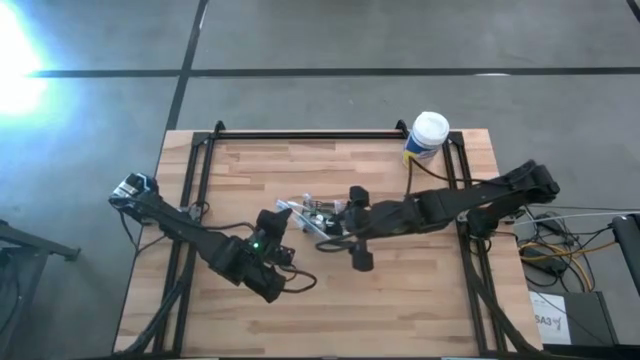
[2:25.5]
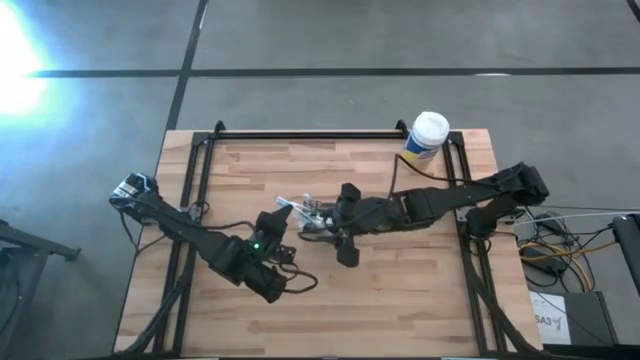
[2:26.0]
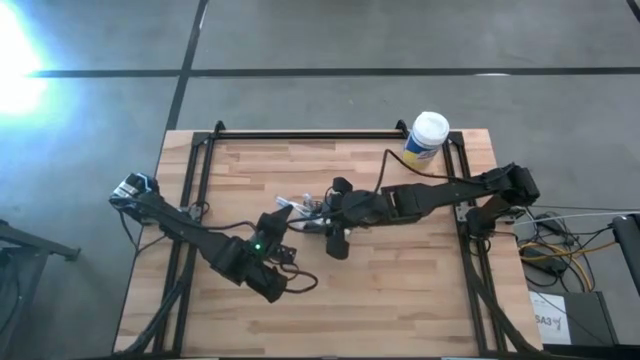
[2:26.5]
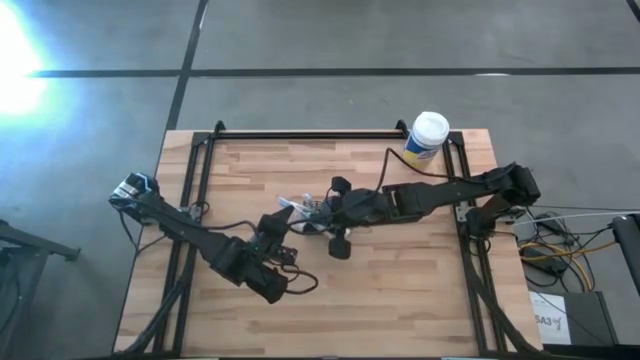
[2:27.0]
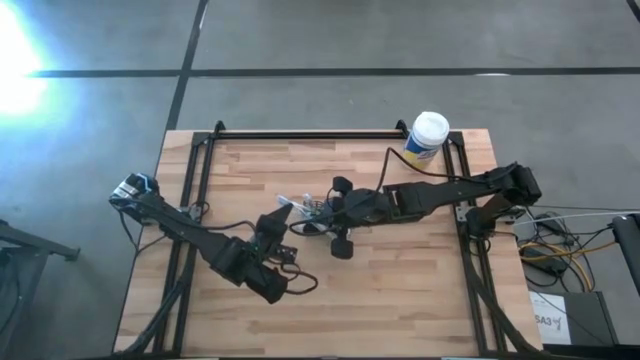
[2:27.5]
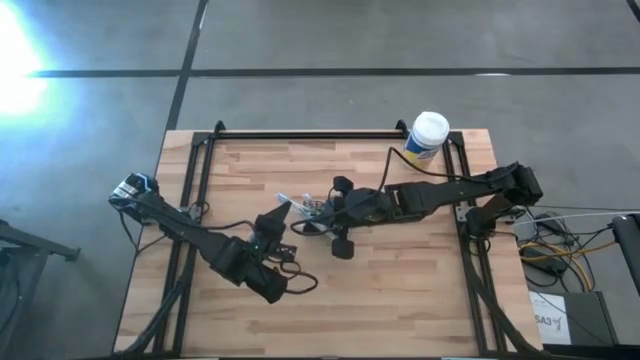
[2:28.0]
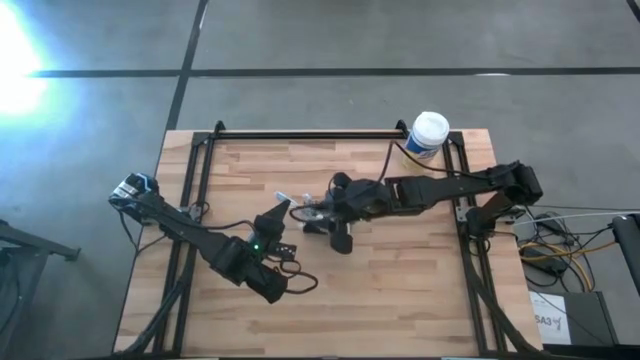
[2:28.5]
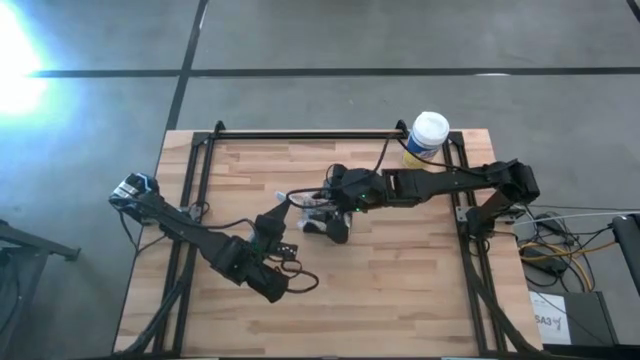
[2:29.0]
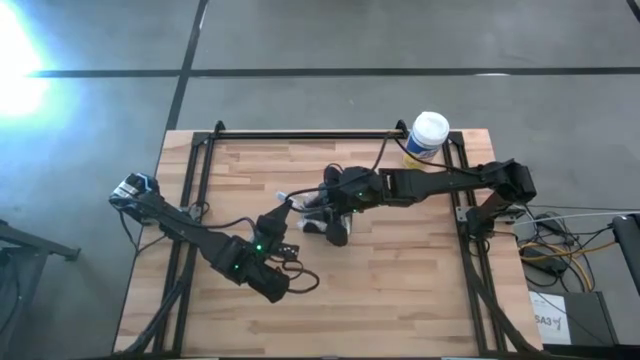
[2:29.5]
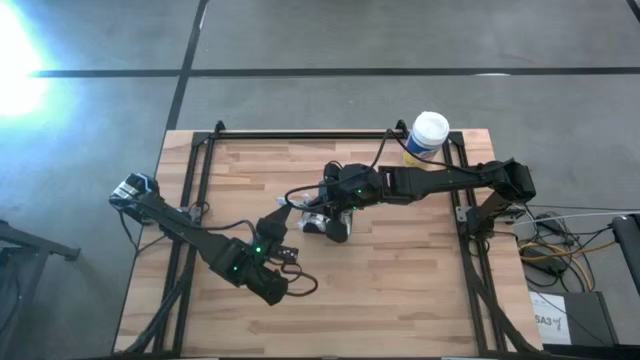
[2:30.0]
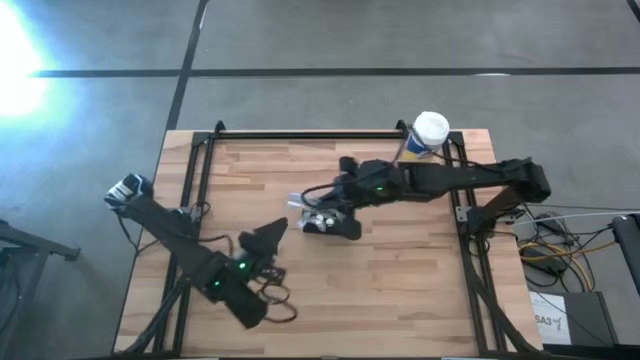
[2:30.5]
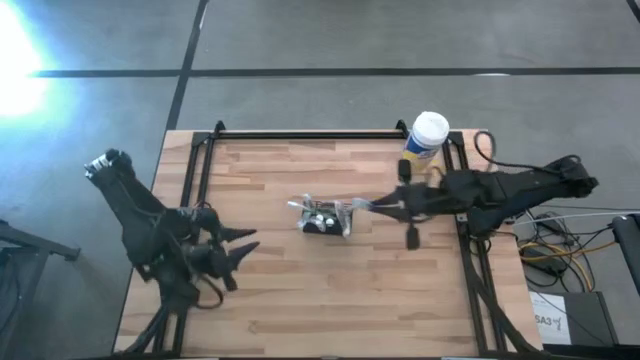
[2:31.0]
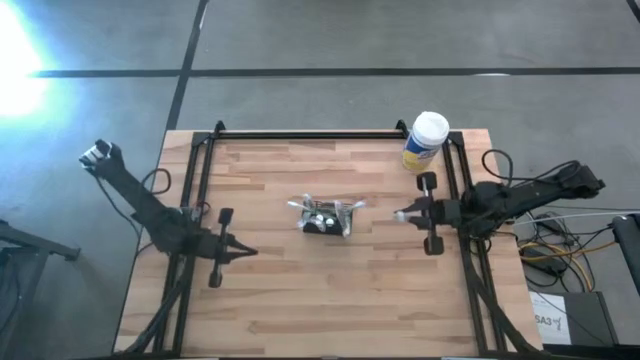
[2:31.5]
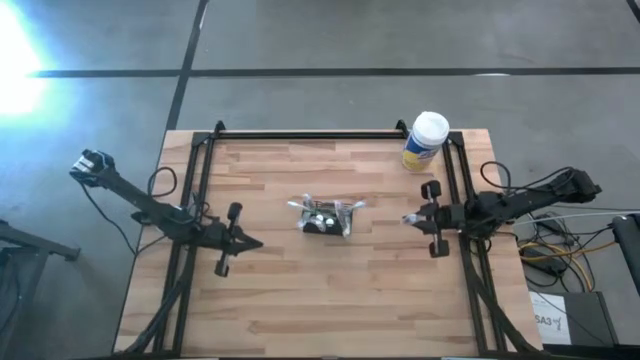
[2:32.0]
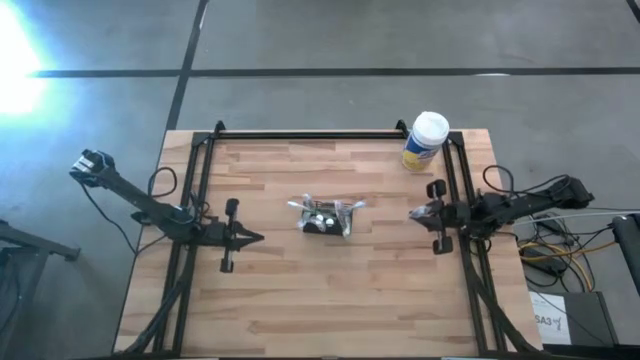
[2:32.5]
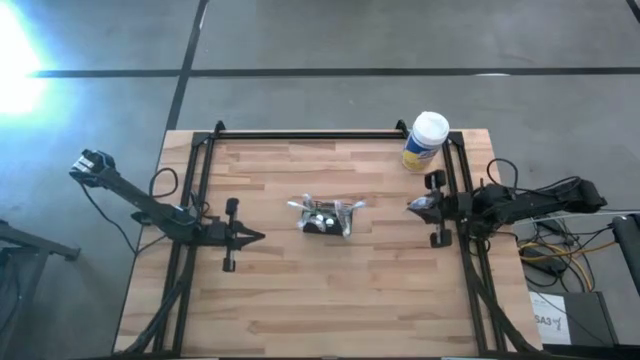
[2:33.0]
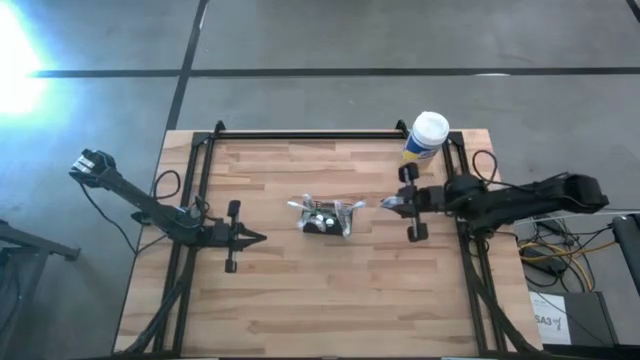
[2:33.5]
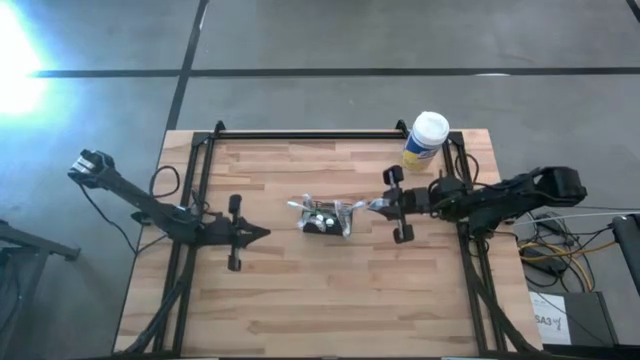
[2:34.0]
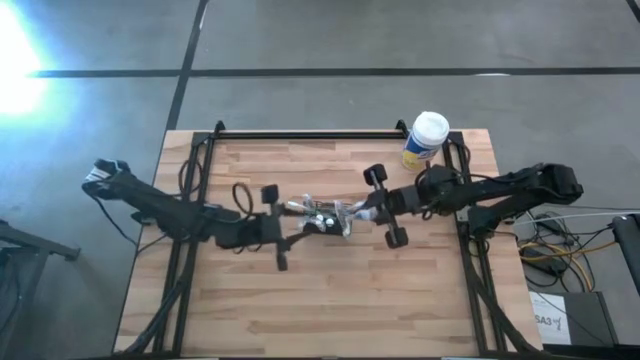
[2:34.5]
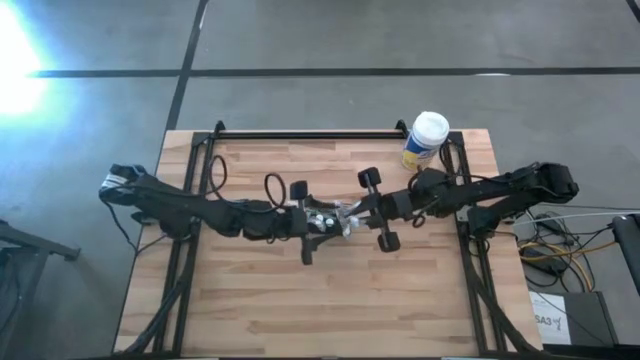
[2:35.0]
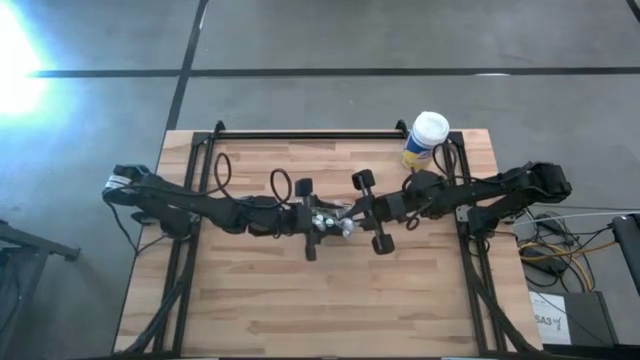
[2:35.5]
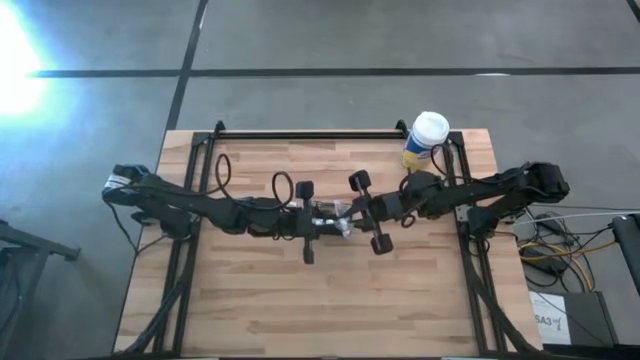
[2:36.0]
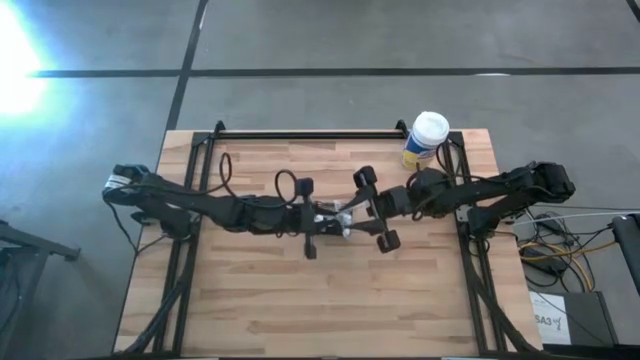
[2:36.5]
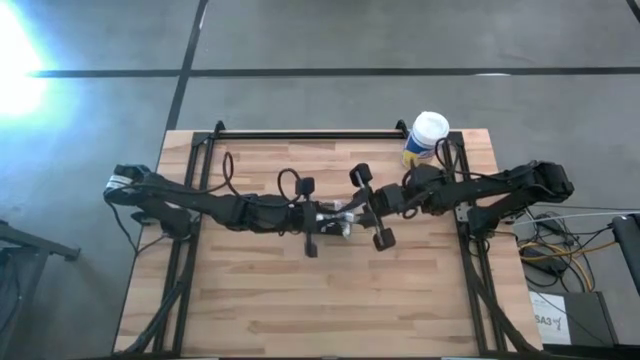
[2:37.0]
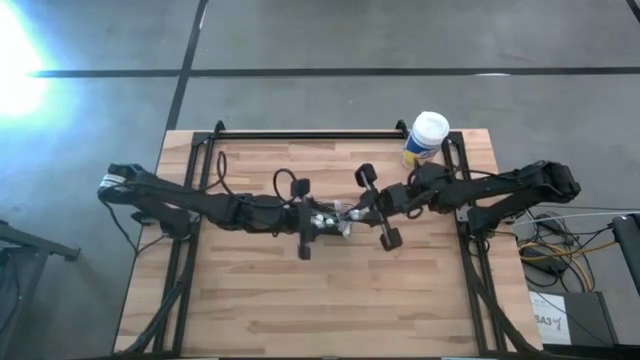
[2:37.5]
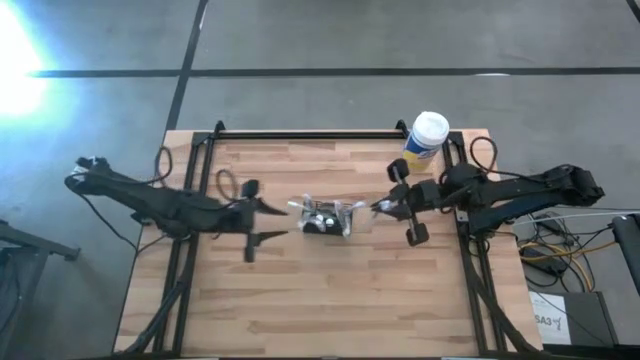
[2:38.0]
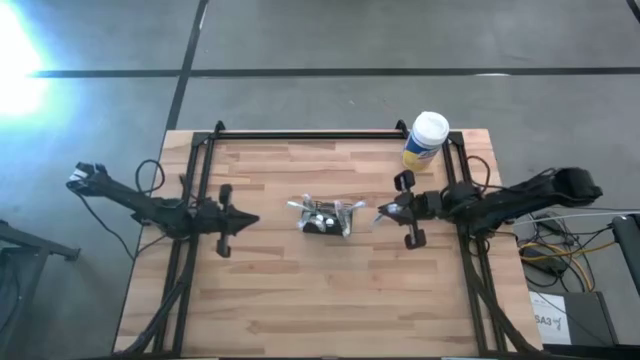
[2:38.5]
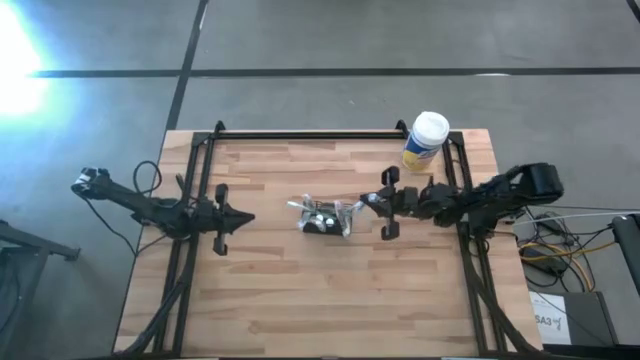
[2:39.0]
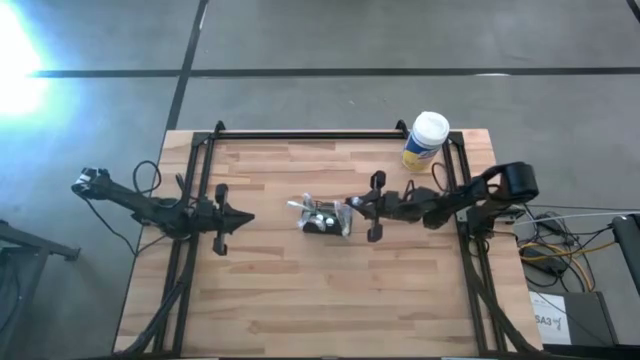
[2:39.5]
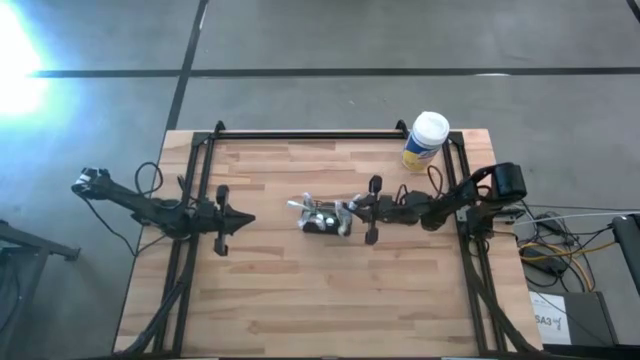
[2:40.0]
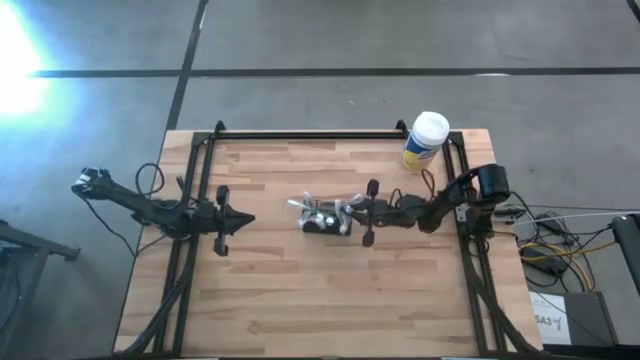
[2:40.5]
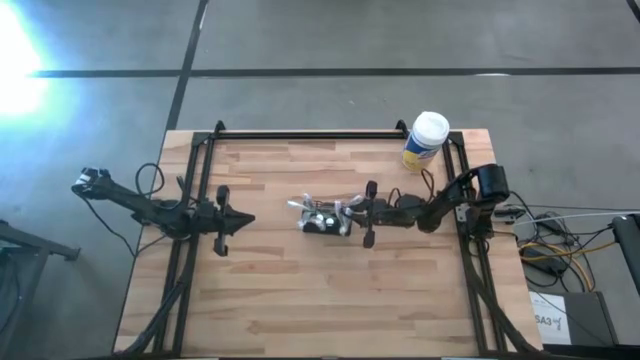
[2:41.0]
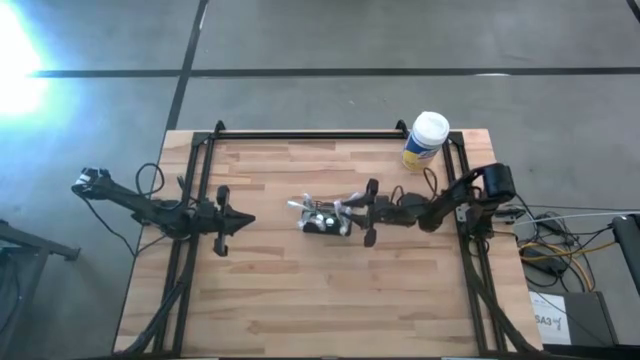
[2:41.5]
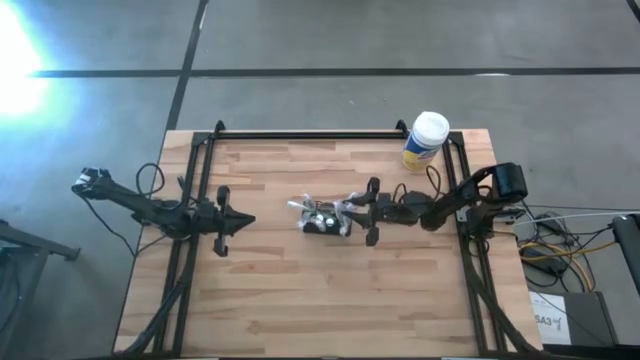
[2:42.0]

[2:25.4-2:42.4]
Task: Pick & Place toothbrushing station
Put the blue toothbrush into the black mesh organizer

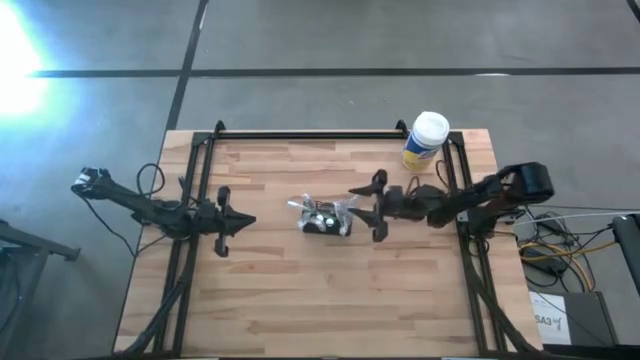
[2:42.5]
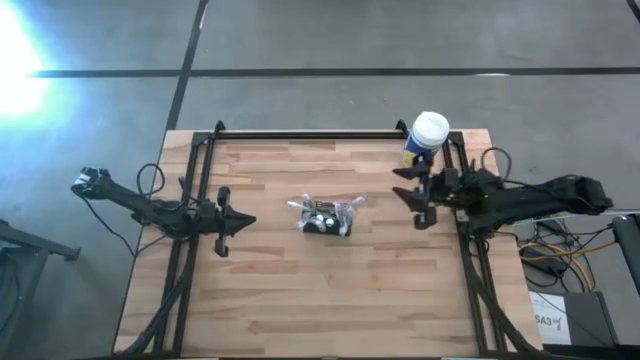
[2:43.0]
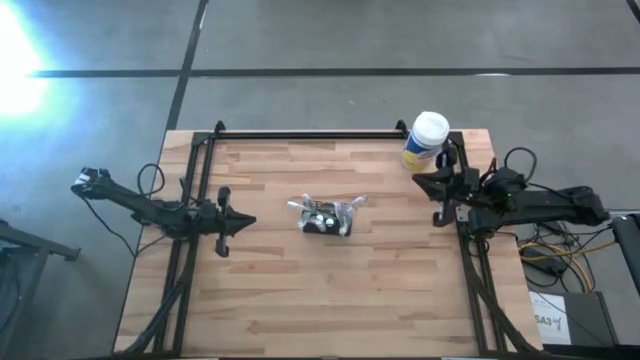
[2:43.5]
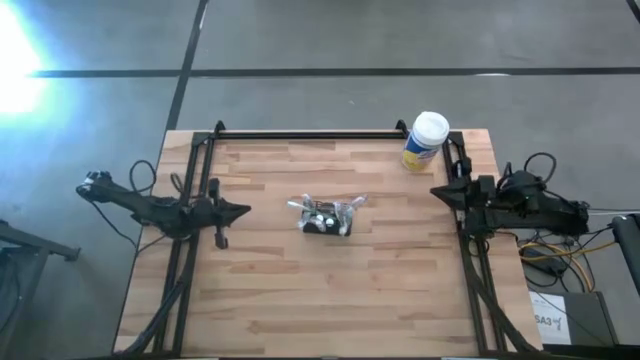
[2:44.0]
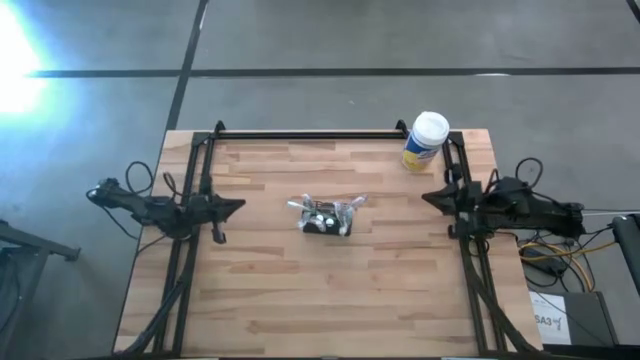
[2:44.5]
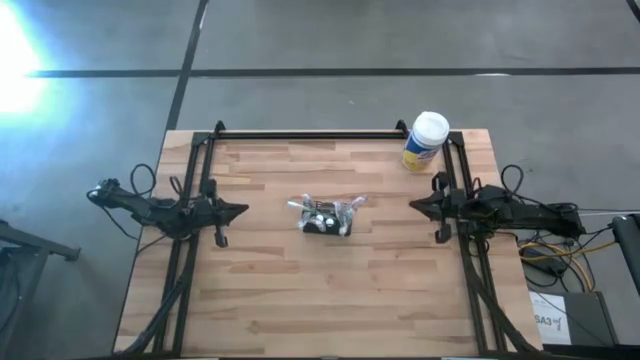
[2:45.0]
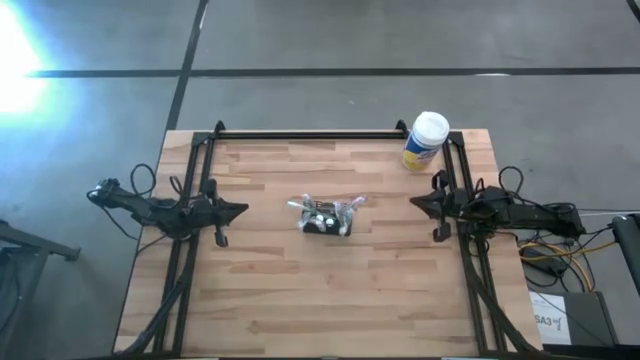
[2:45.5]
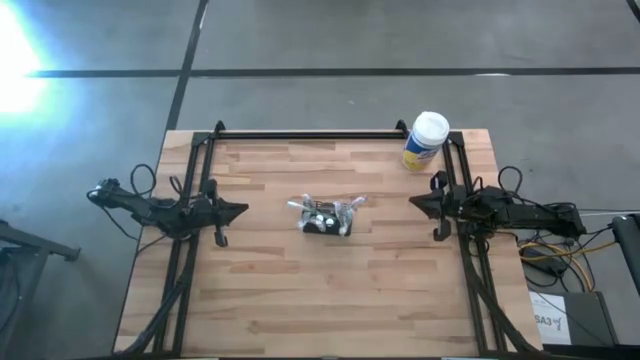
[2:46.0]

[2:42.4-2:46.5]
Return to Home Position
